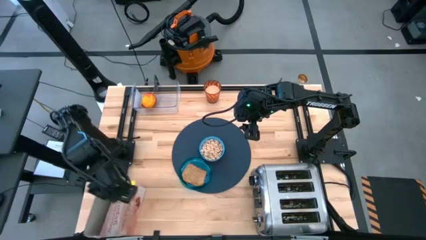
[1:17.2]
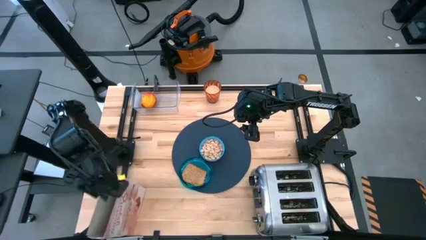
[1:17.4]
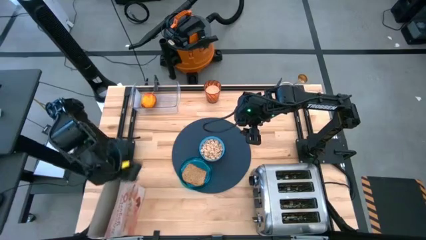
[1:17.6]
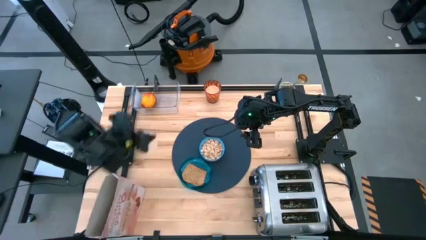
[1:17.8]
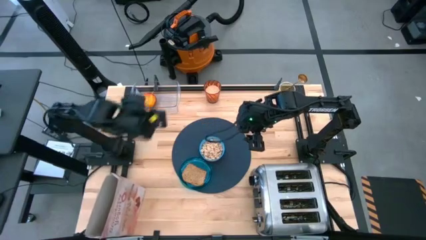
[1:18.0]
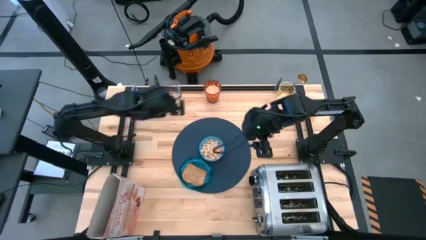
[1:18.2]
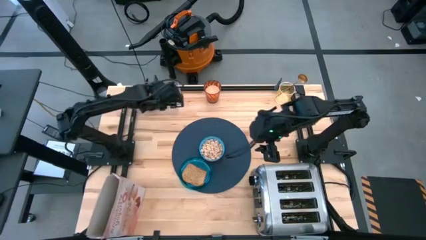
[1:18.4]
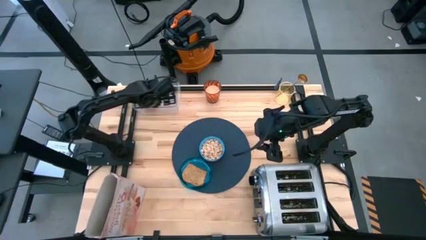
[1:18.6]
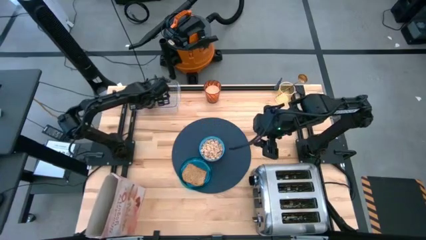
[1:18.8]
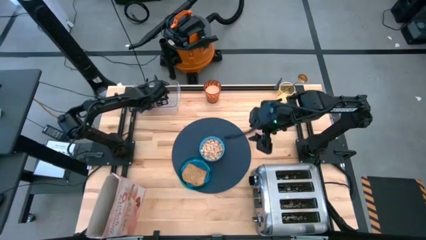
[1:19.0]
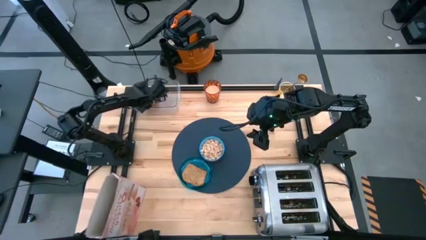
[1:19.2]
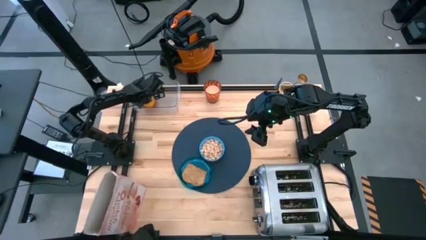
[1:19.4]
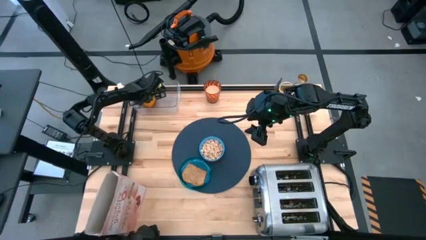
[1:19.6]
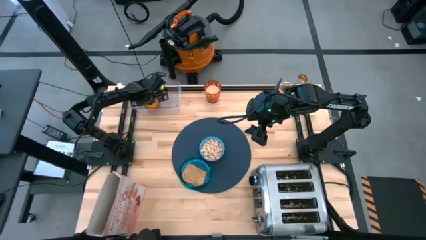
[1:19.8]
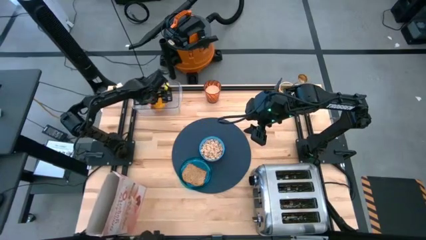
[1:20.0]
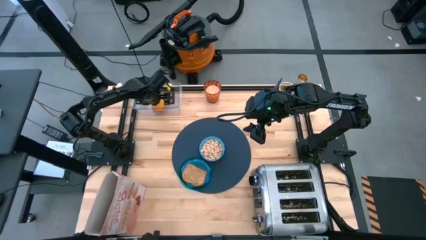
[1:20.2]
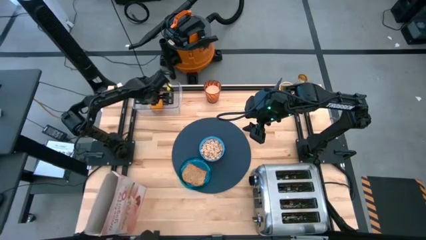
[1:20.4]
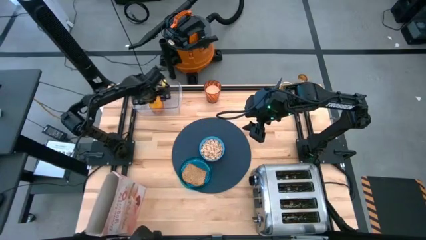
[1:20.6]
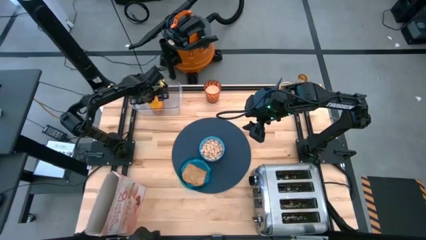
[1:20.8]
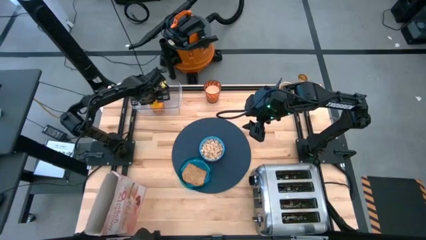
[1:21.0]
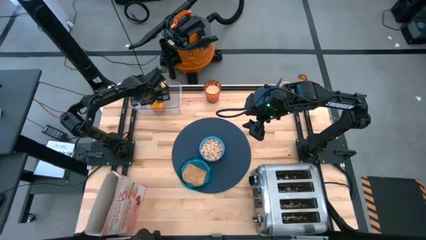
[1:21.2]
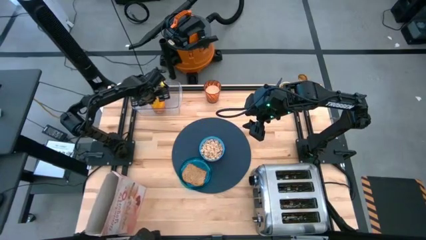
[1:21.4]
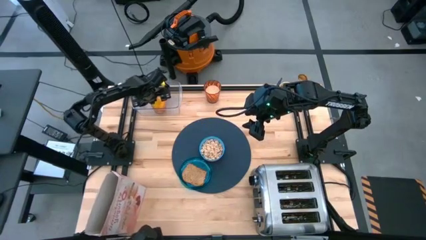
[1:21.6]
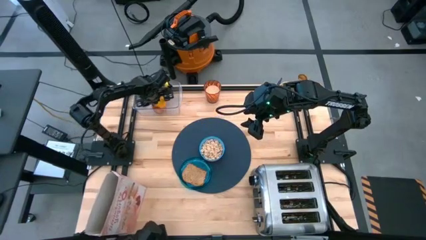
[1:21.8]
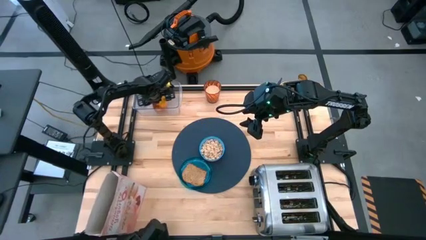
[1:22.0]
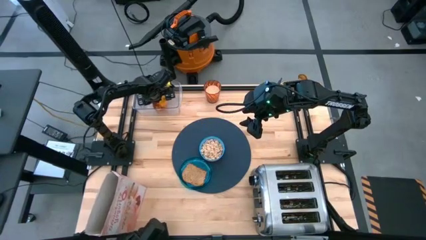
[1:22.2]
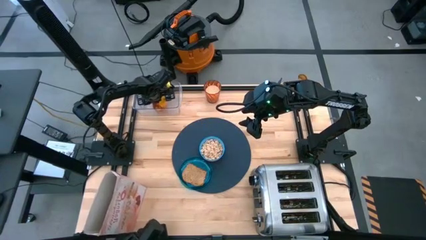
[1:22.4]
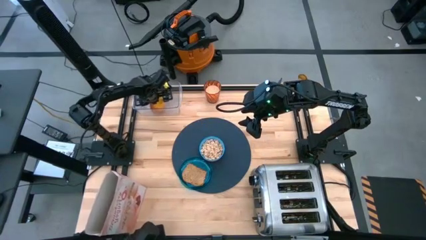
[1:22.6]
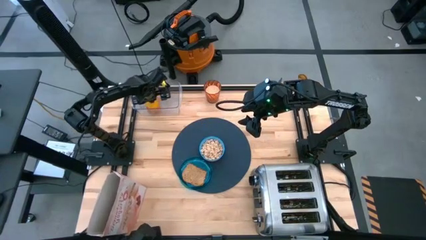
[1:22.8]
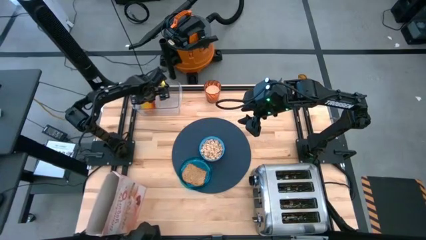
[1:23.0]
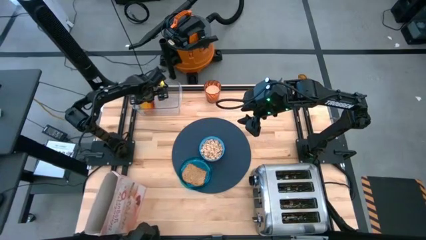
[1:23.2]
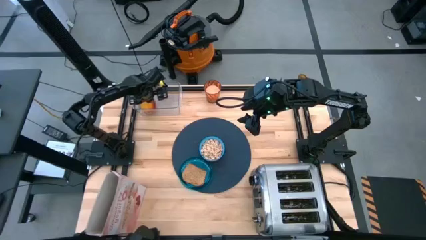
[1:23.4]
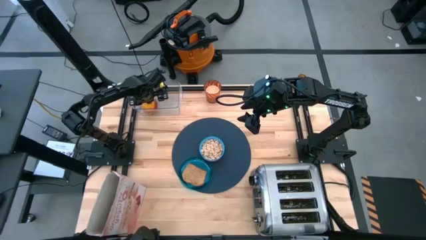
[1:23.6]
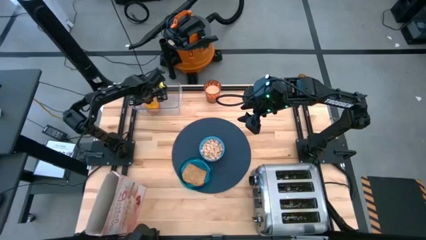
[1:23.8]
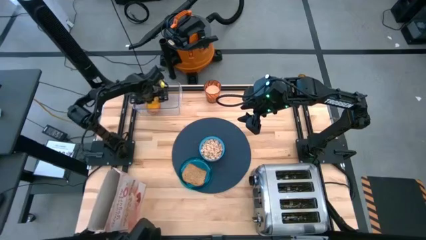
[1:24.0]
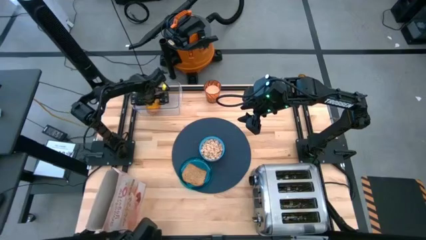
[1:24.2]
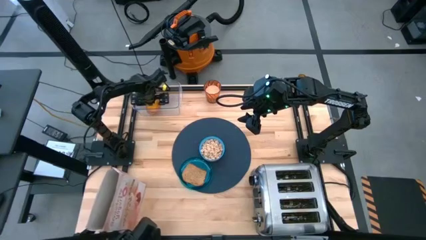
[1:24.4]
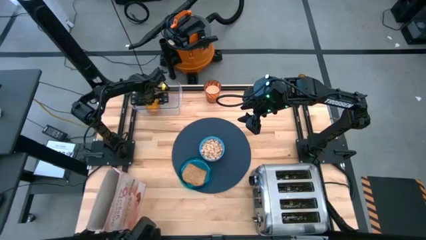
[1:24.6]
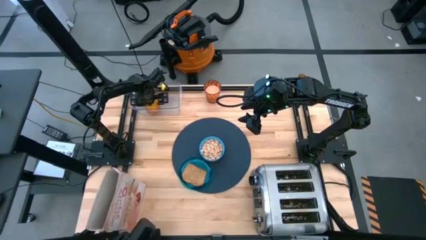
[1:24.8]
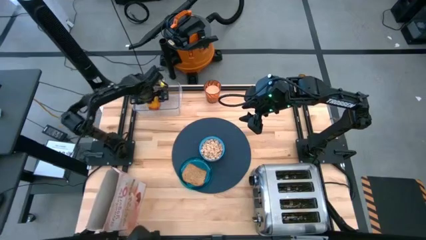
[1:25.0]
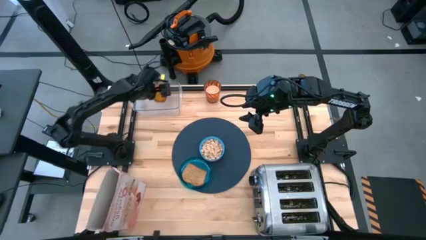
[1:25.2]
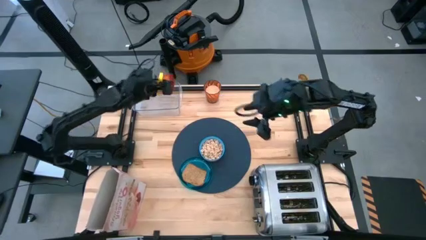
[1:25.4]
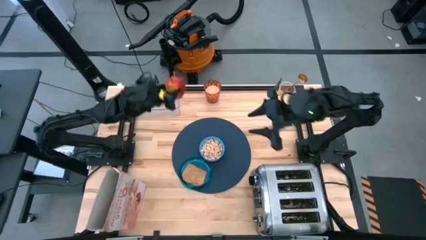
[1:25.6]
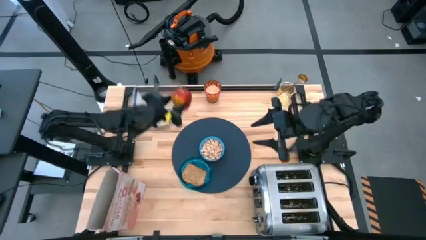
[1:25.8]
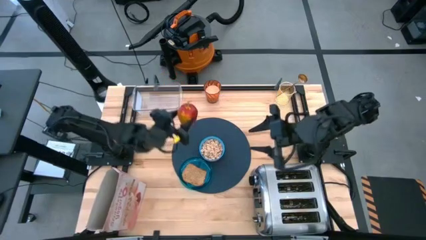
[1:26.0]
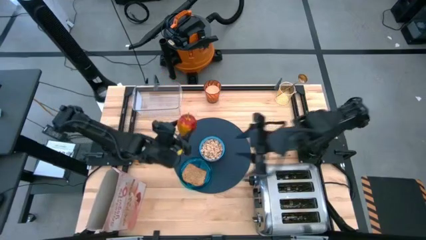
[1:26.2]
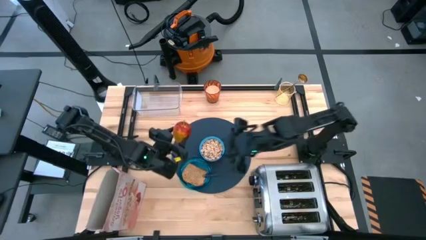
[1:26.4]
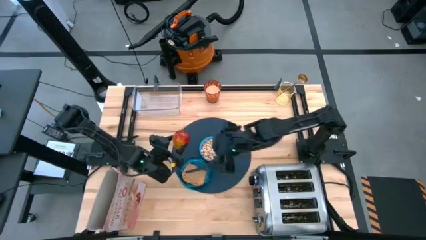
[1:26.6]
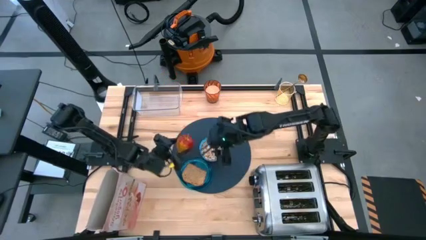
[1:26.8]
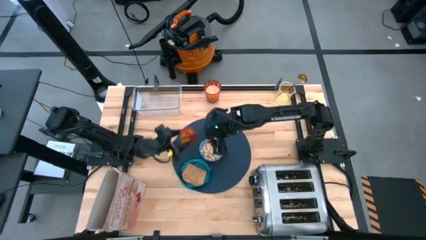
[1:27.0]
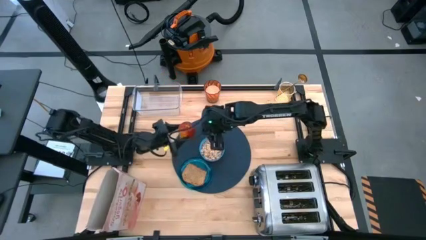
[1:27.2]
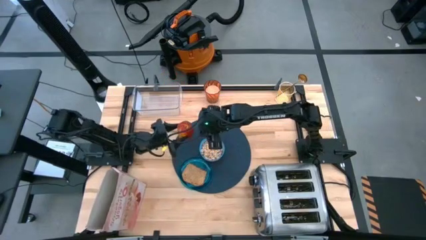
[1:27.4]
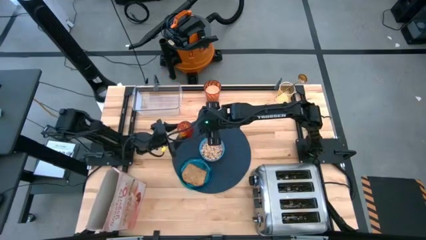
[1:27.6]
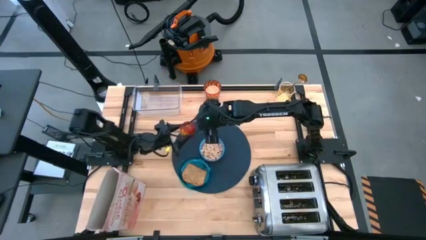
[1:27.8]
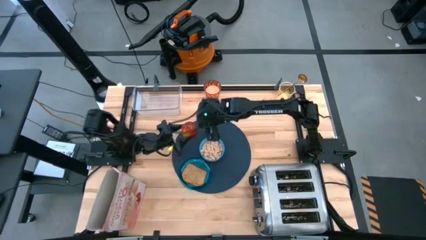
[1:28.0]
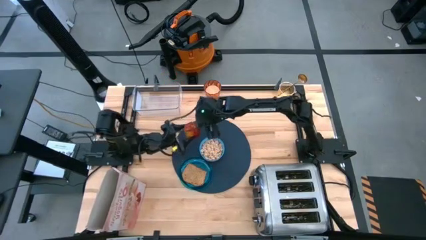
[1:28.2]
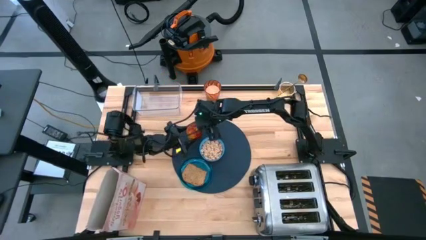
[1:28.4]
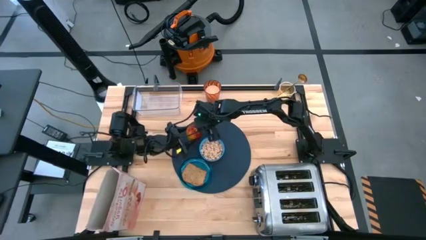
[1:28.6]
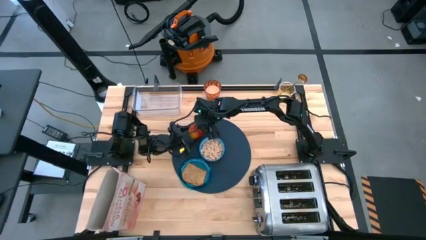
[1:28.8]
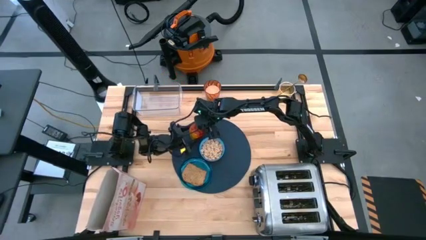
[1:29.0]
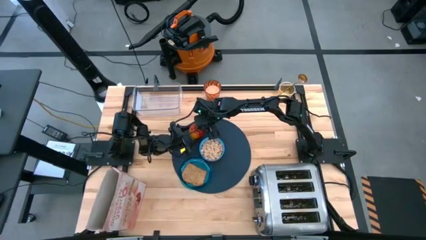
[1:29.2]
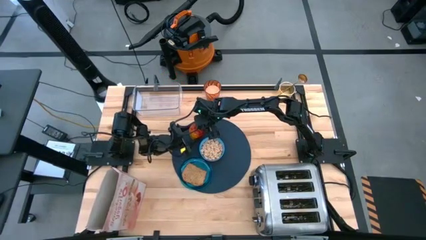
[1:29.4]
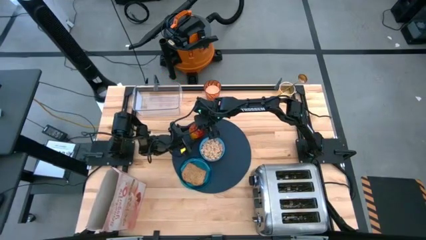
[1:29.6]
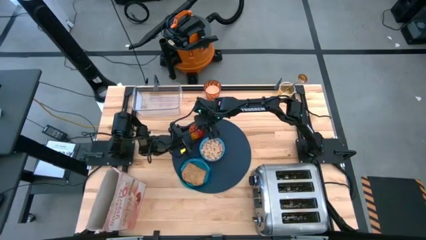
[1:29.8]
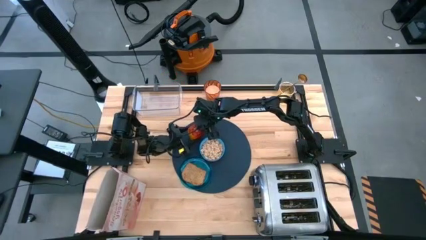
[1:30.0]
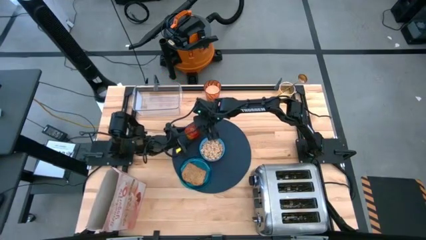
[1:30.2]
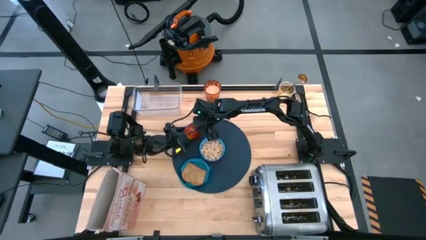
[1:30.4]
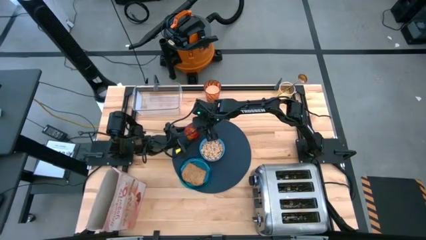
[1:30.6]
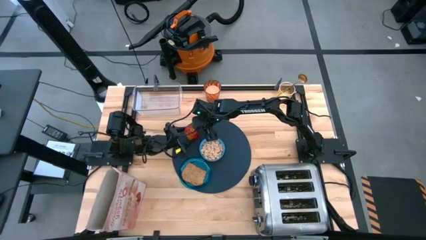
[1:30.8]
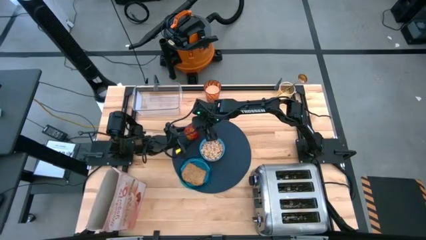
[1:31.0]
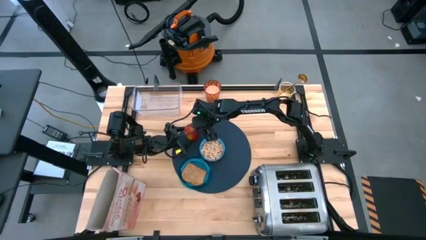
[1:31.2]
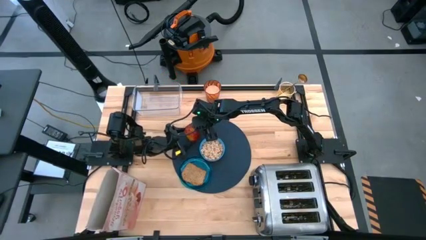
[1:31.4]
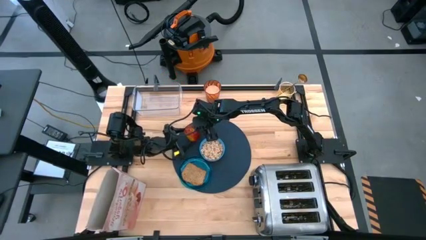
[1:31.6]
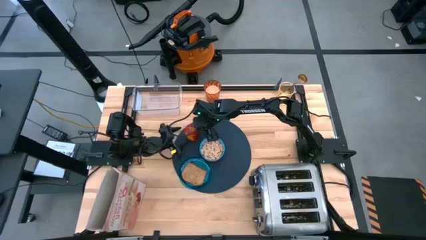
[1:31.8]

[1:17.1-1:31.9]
Task: Arrange a breakfast setting
Put the apple into the top left of the placemat

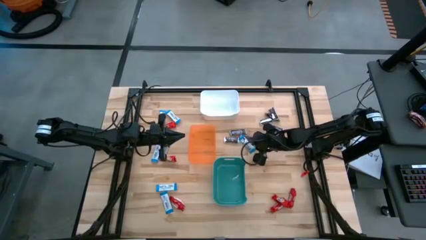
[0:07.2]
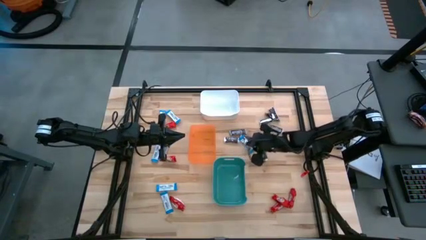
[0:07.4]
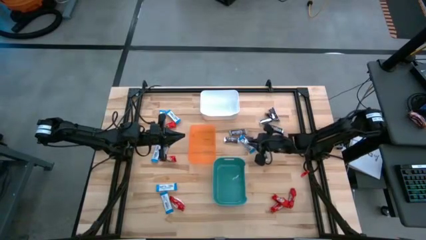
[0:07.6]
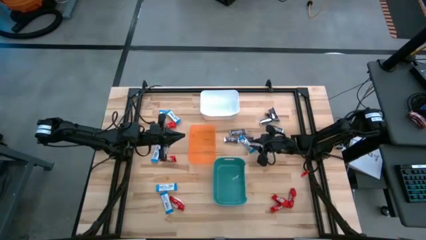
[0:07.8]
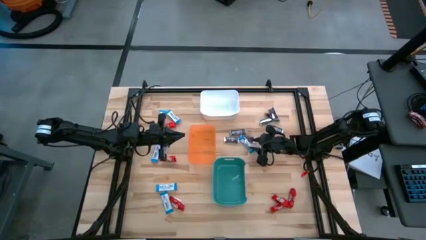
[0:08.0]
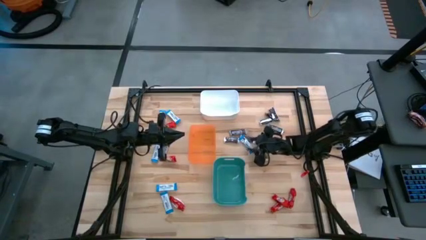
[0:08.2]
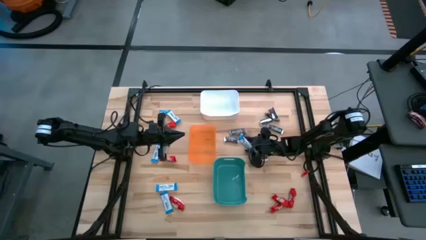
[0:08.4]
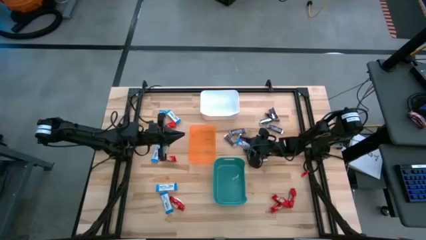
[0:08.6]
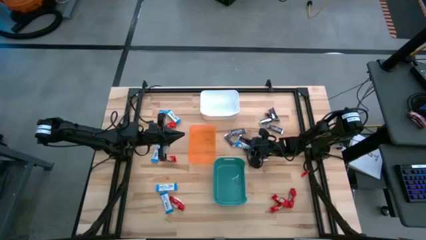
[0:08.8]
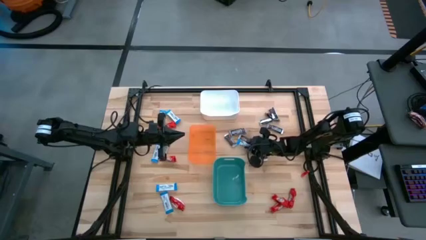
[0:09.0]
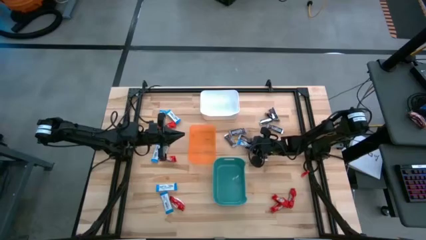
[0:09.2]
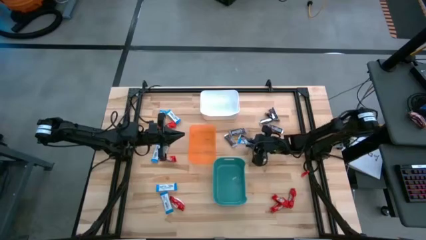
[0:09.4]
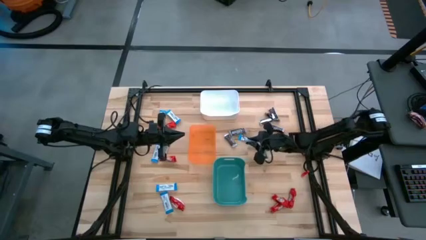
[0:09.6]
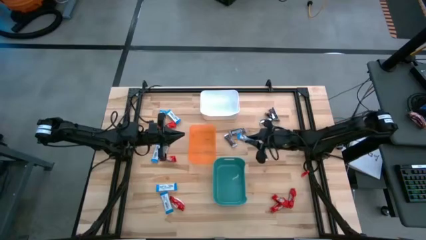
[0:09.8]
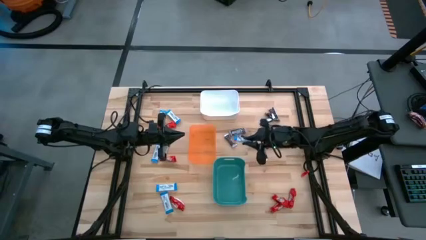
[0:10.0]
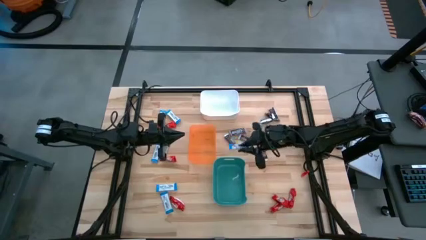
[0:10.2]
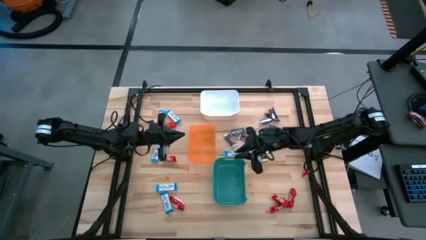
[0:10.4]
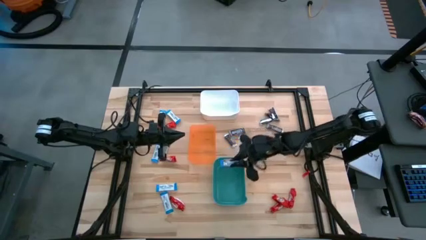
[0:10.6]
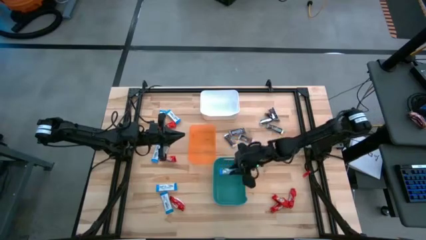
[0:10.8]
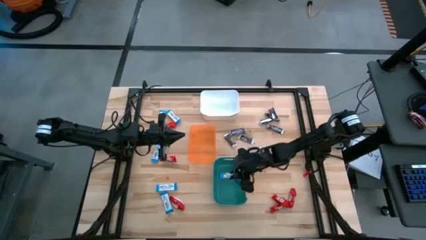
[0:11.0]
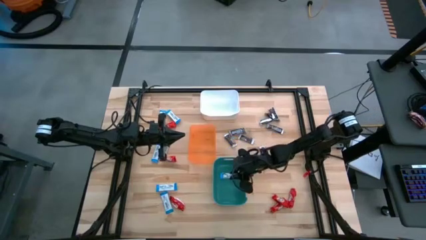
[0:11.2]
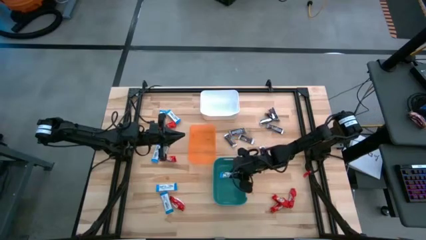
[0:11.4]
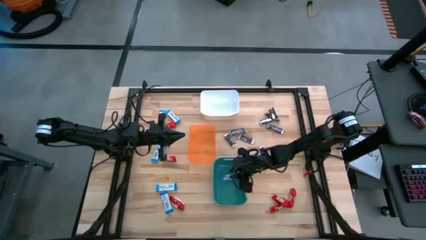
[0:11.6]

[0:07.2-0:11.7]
Task: Sort candy
Put the white chocolate bar into the green bin
